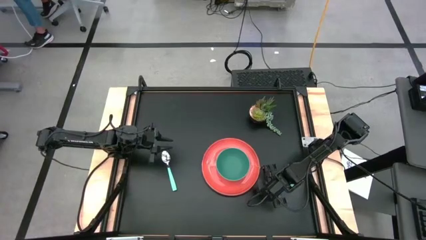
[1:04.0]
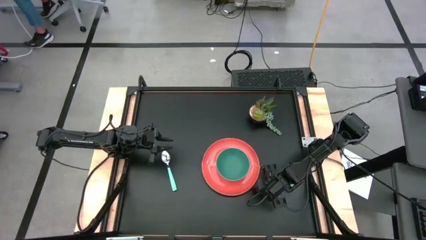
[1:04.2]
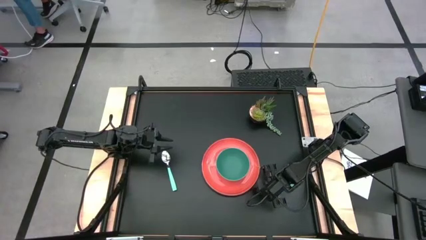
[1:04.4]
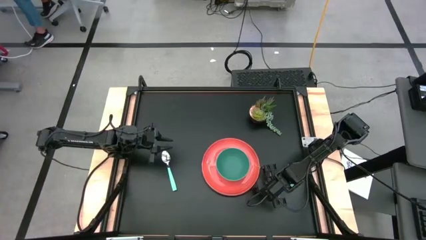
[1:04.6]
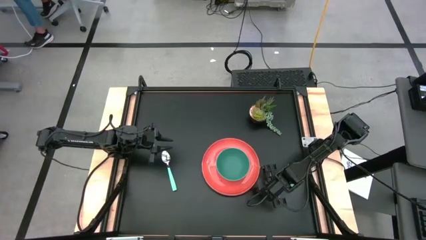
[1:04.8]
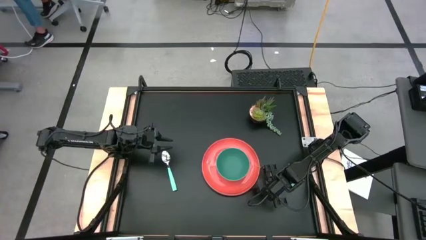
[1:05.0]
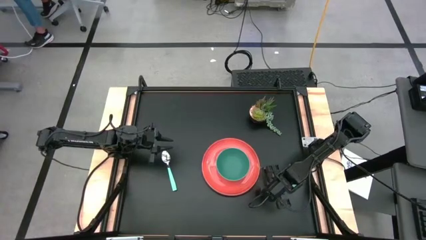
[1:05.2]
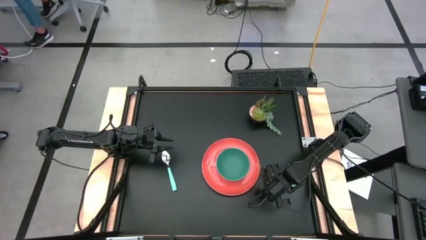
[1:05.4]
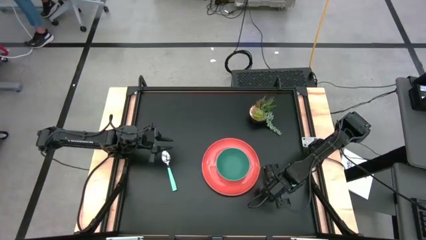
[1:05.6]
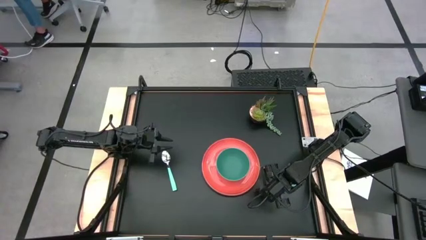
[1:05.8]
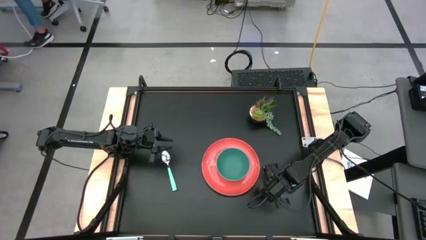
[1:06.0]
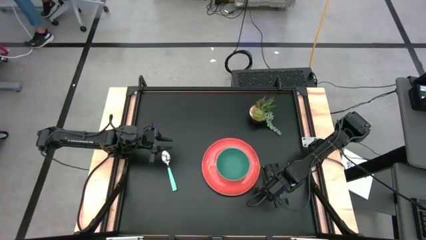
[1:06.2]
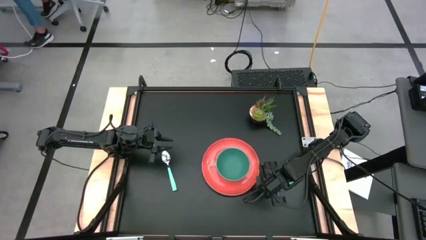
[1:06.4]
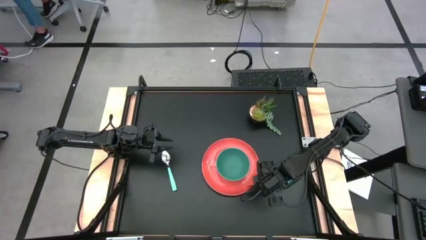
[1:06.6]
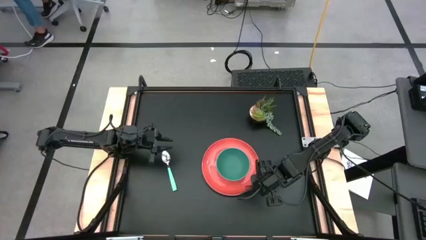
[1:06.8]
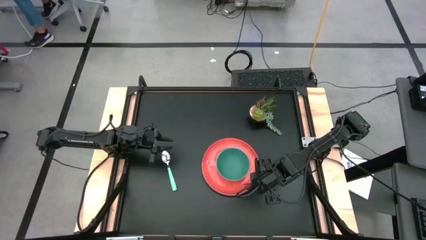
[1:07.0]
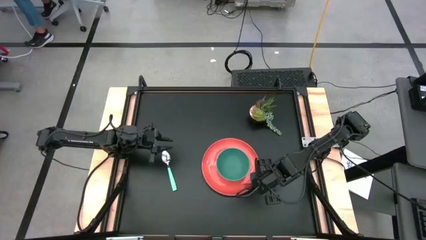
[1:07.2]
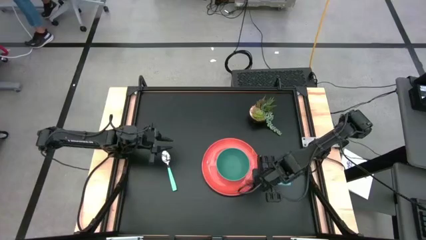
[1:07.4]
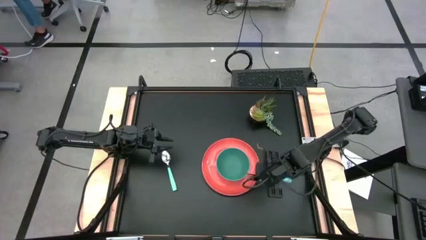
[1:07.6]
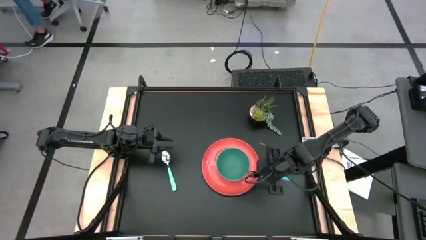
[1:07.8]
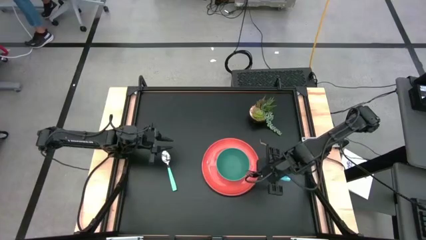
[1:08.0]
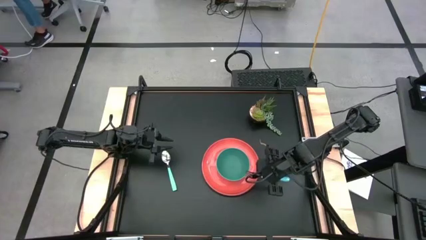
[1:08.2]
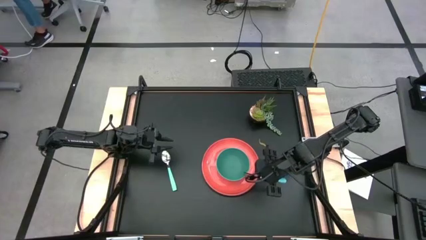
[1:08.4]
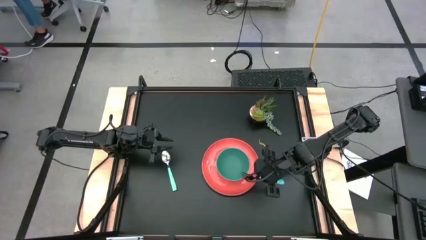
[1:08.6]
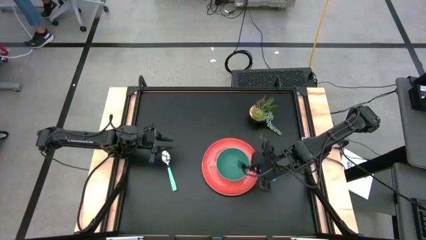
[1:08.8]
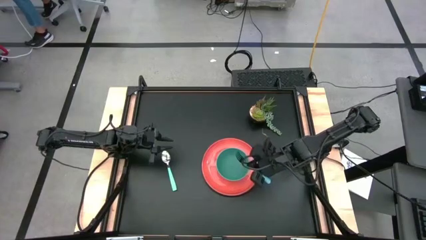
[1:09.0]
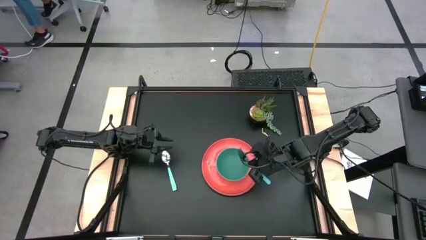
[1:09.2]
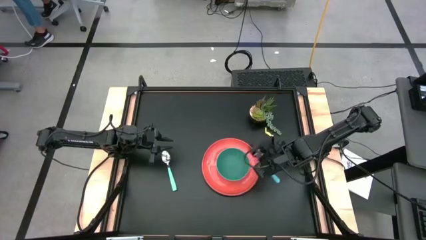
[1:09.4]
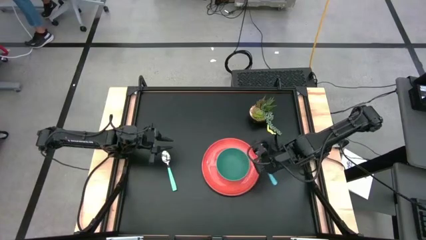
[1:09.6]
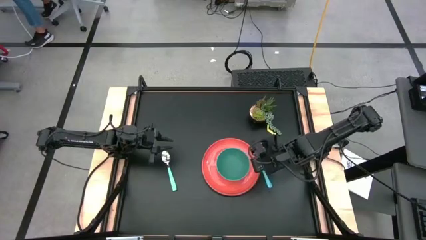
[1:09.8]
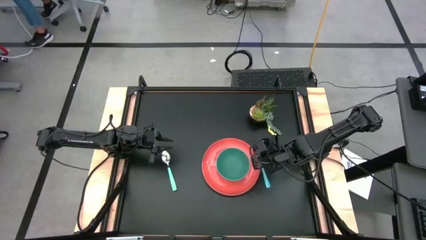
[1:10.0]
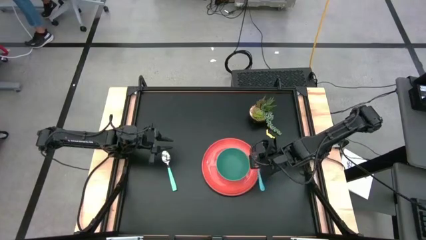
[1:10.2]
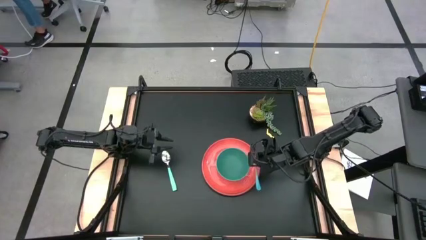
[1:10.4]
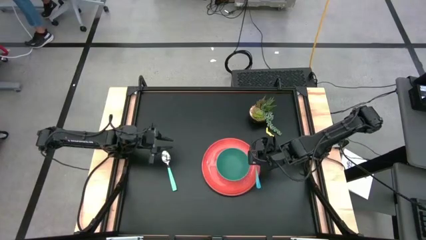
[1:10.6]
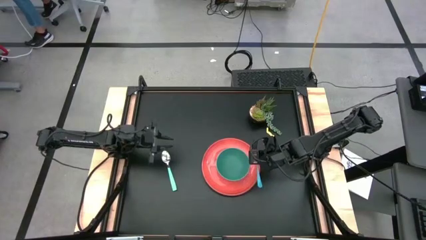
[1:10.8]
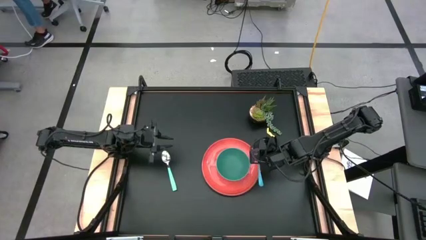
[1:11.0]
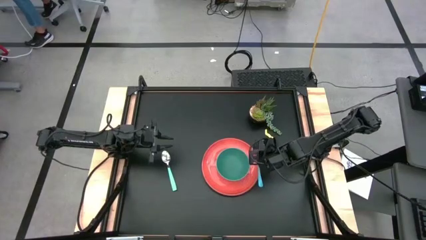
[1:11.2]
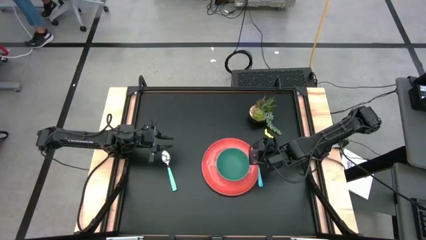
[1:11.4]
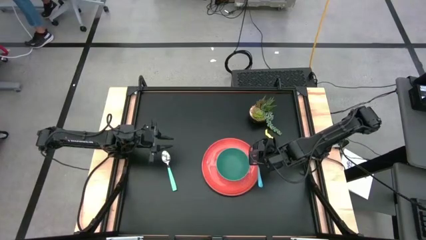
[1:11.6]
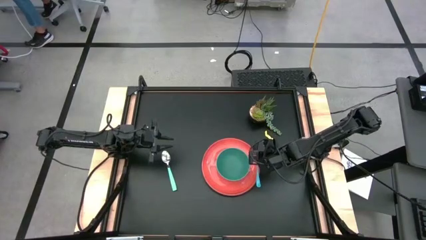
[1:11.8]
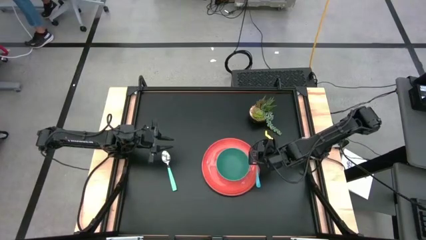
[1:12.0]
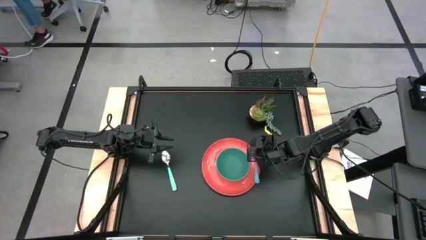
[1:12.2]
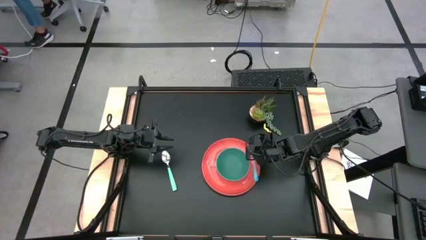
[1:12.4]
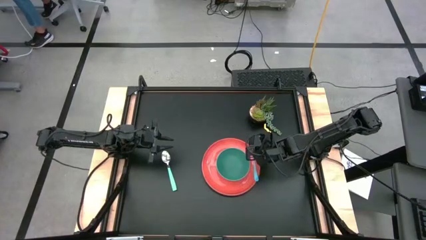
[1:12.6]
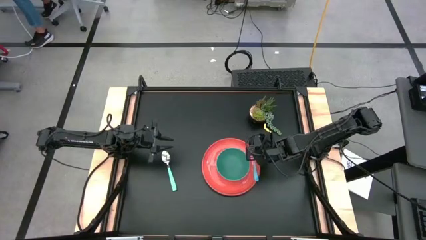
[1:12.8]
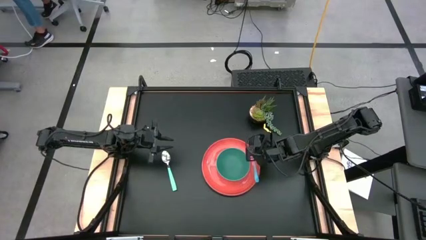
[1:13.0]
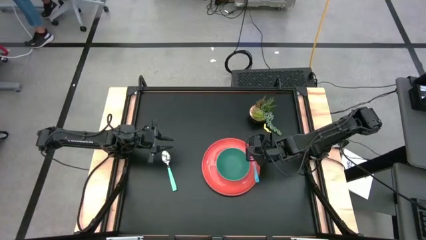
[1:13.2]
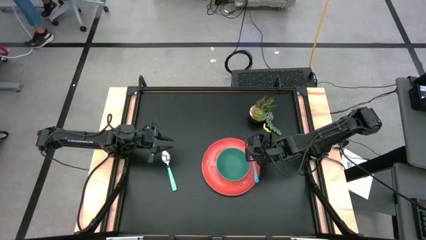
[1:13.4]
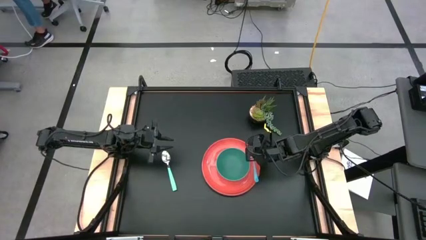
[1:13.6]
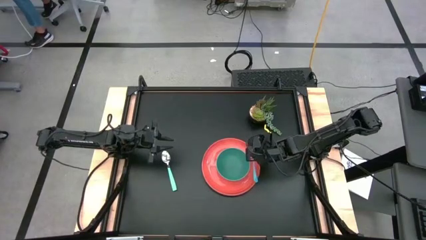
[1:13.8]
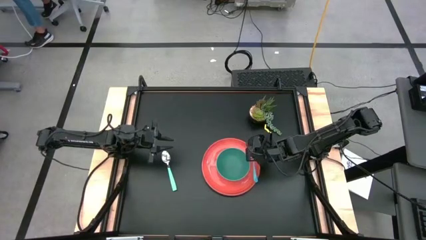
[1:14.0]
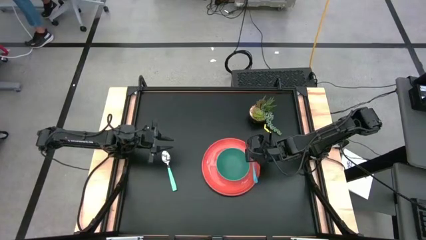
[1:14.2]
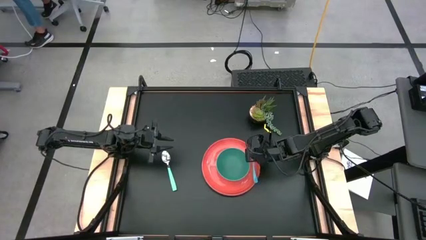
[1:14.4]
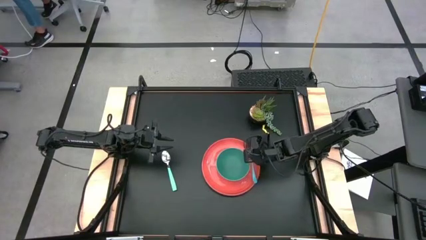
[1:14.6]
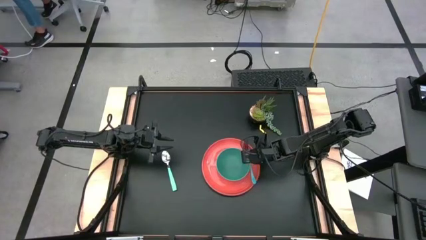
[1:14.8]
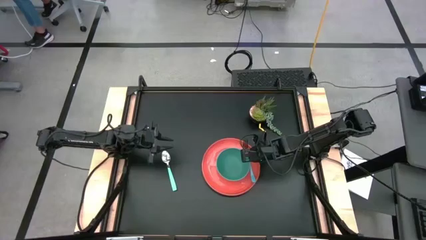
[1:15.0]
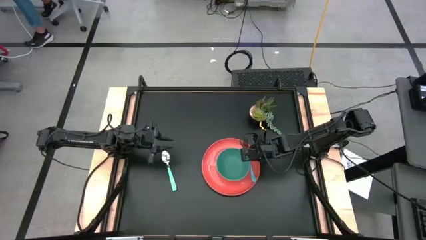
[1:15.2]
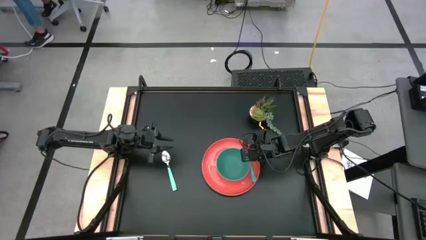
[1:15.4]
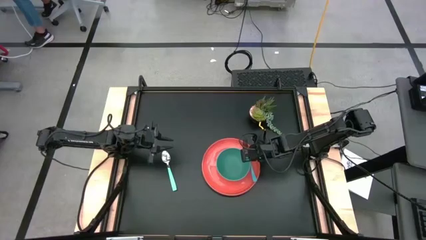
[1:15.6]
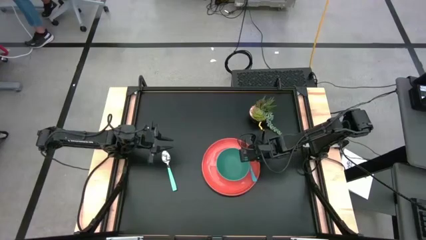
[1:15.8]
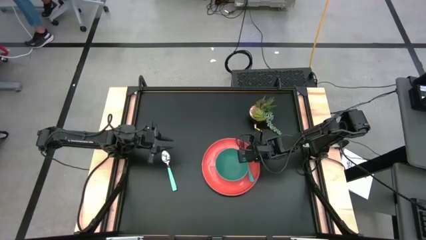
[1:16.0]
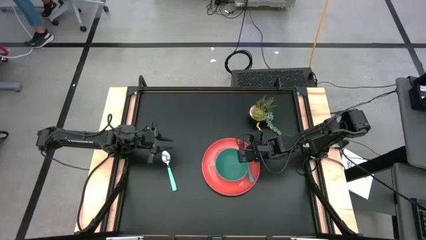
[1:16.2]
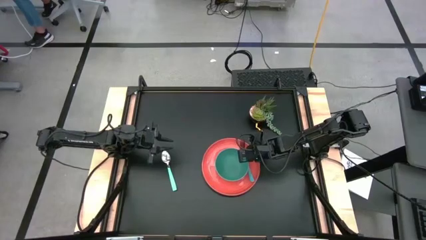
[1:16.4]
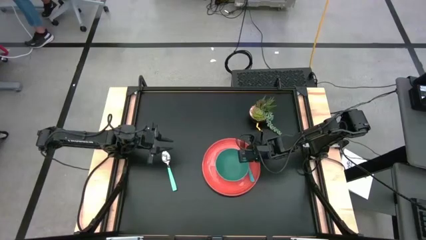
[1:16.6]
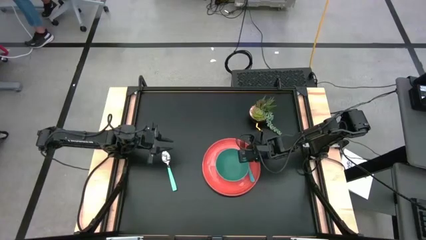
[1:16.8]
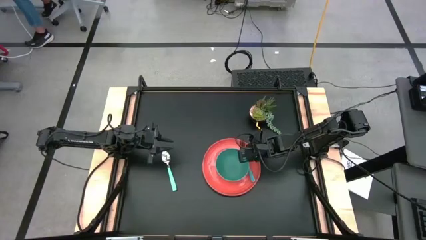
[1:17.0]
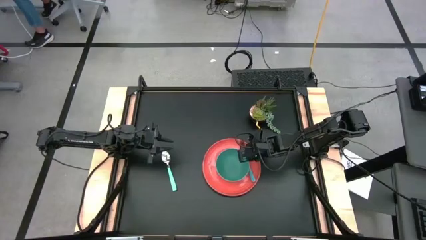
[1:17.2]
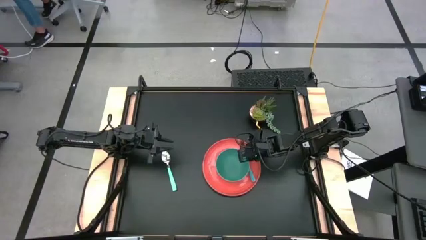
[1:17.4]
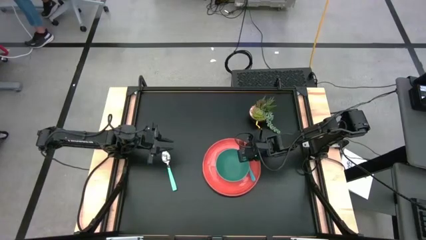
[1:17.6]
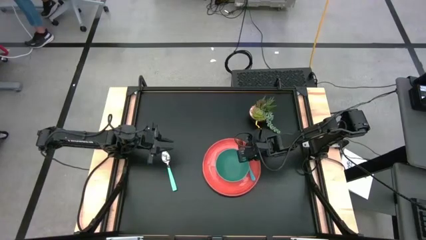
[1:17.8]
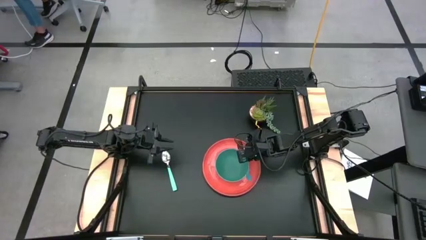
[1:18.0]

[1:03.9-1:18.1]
Task: Set table place
Put the blue fork on the orange plate to the right of the green bowl

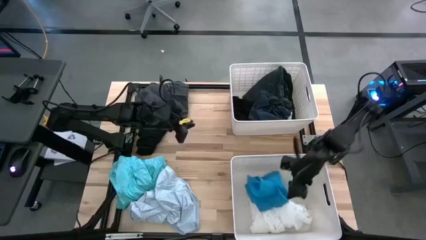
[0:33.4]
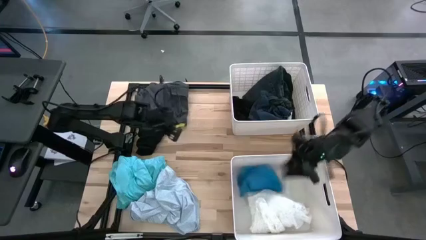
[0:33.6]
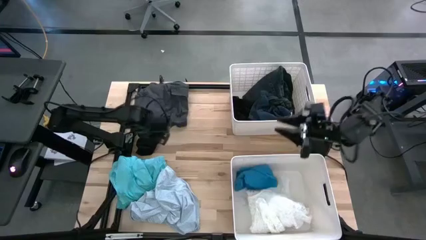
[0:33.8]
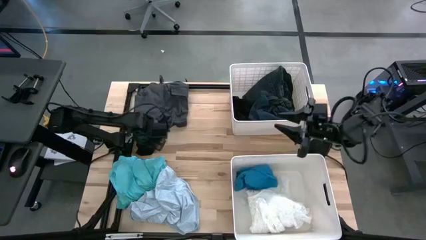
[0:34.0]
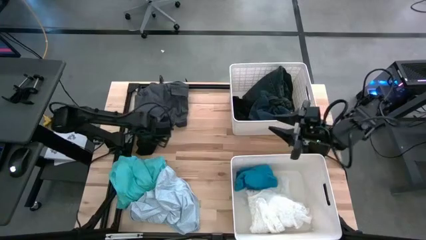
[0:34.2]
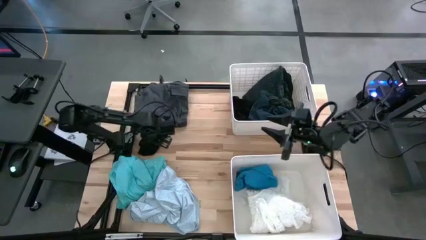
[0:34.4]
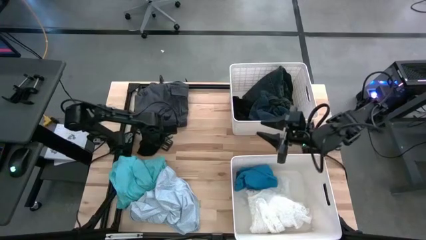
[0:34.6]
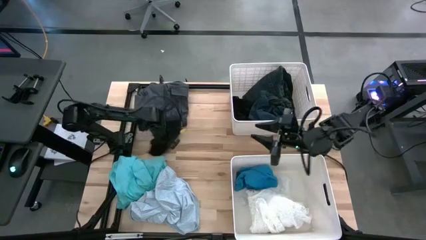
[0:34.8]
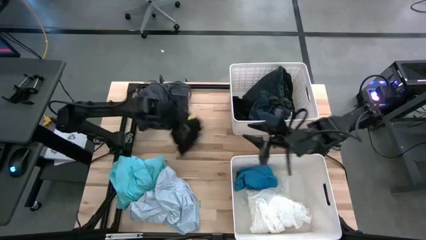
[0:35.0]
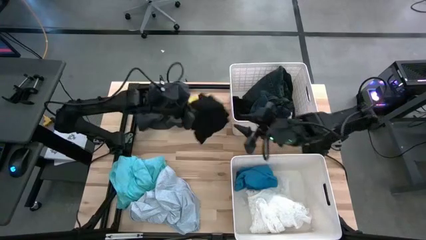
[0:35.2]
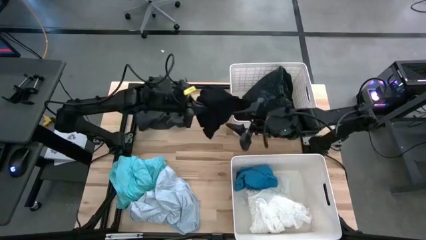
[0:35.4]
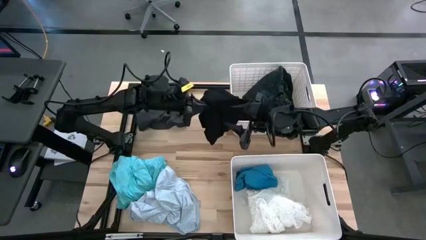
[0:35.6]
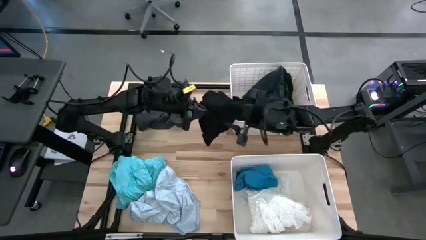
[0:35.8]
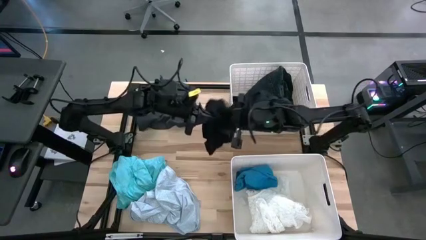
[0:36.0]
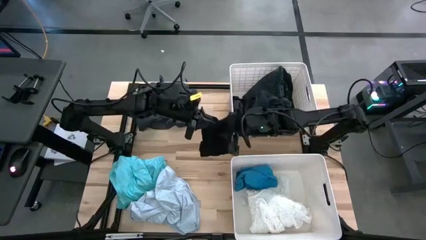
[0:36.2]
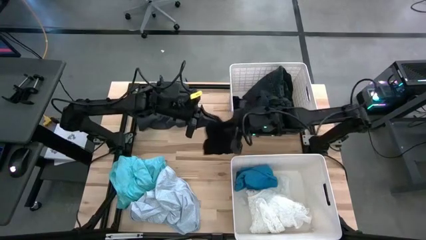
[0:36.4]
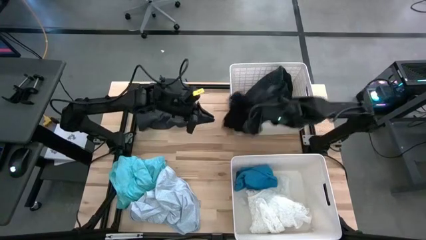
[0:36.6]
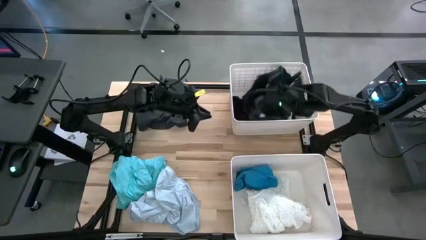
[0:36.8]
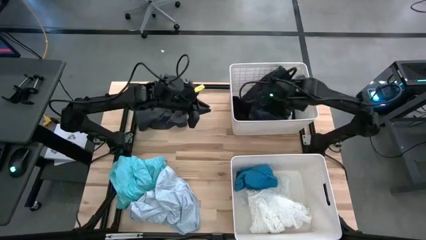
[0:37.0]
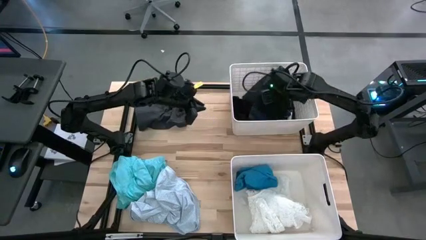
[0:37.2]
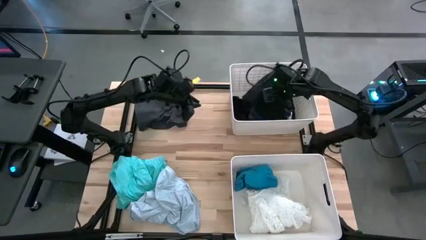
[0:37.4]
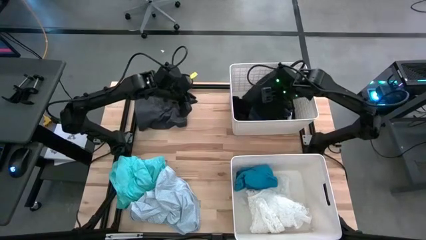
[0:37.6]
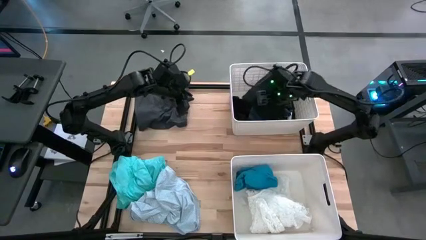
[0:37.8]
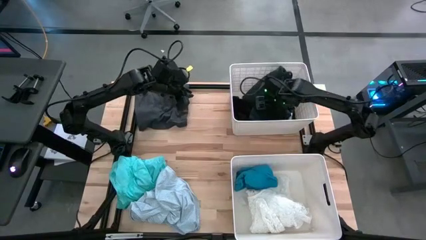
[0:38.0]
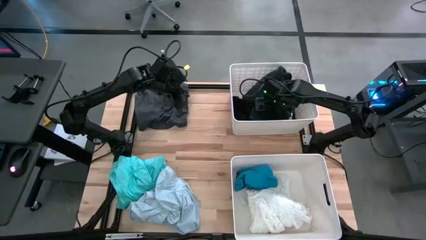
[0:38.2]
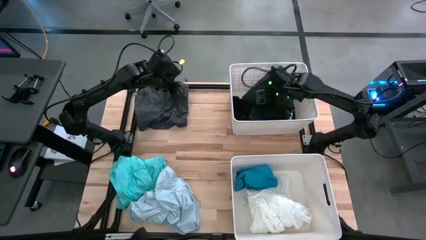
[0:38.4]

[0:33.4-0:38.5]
Task: Sort clothes
Put the black boxer into the top white laundry bin
